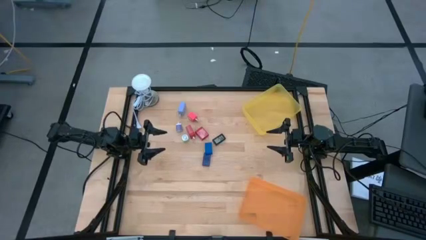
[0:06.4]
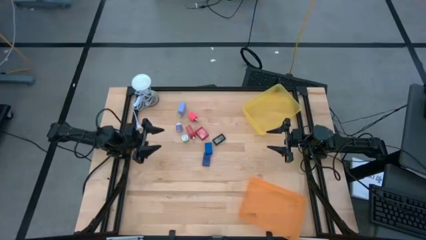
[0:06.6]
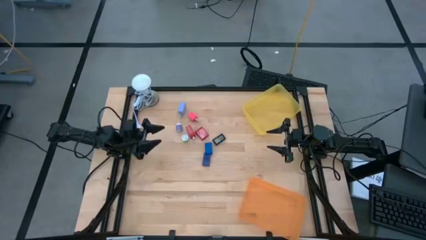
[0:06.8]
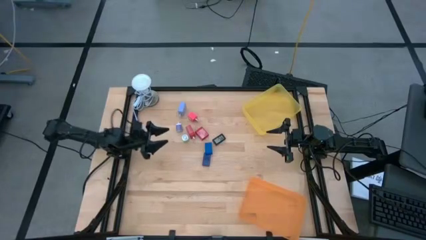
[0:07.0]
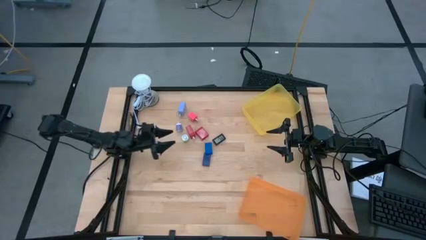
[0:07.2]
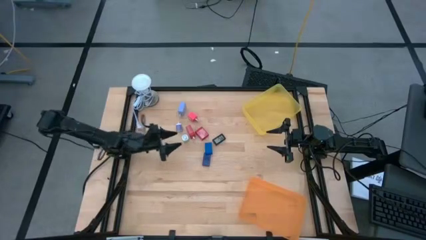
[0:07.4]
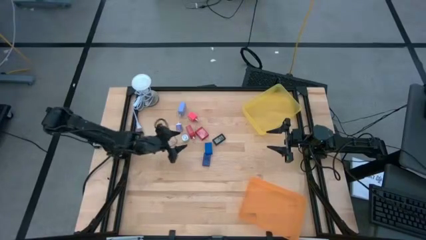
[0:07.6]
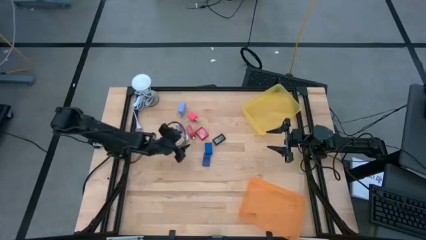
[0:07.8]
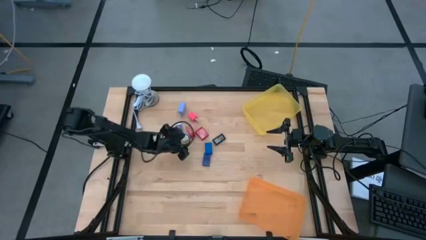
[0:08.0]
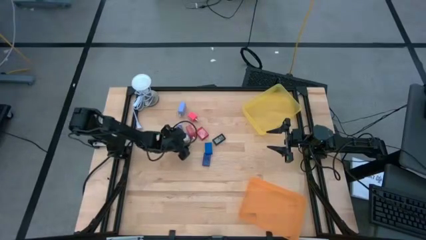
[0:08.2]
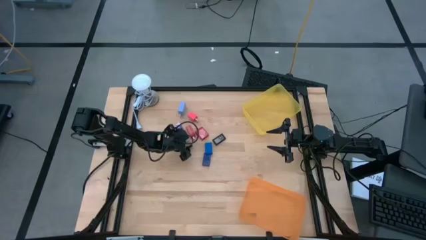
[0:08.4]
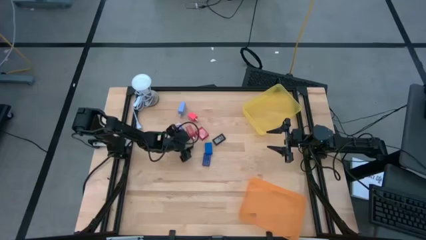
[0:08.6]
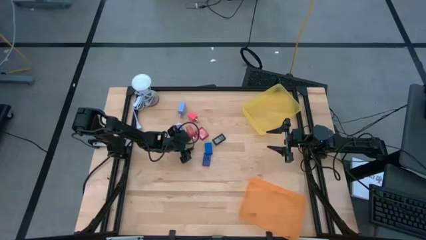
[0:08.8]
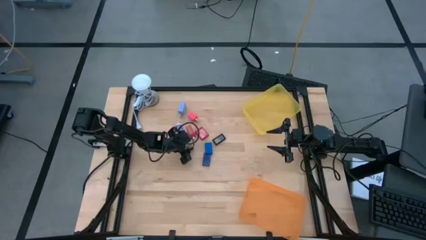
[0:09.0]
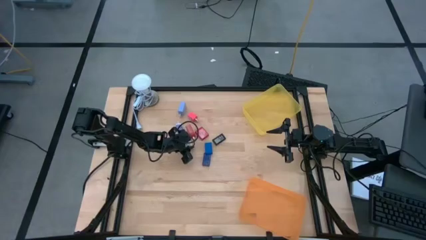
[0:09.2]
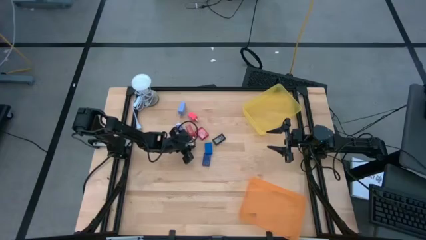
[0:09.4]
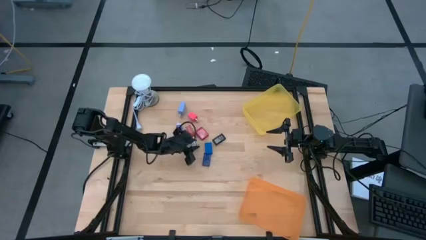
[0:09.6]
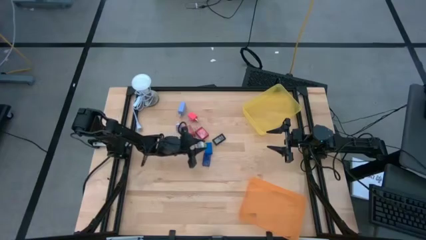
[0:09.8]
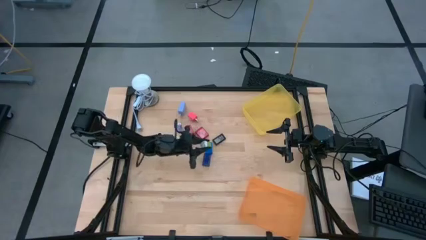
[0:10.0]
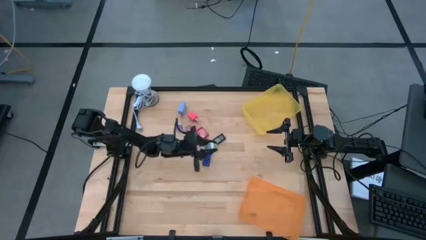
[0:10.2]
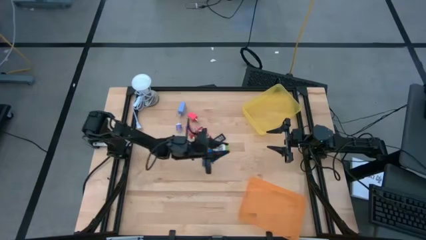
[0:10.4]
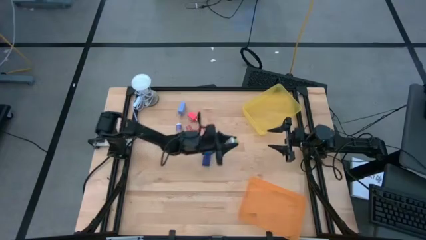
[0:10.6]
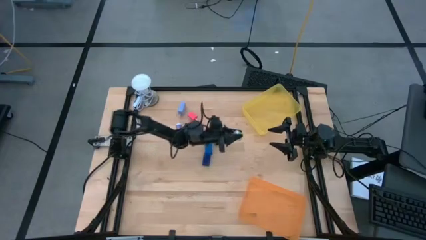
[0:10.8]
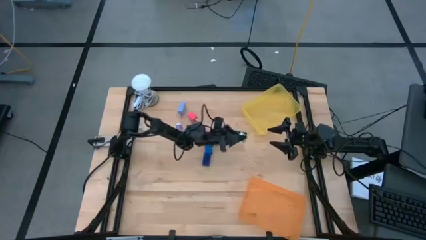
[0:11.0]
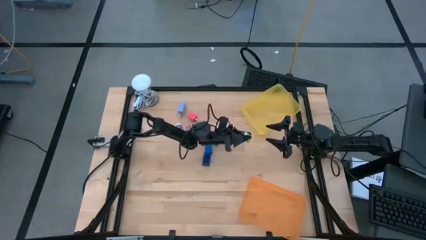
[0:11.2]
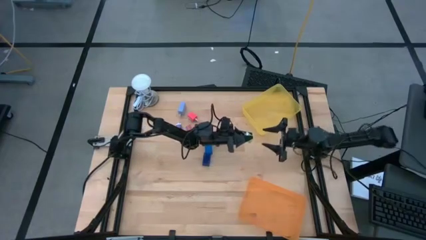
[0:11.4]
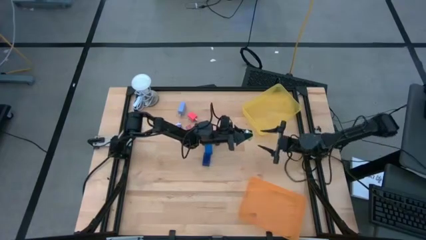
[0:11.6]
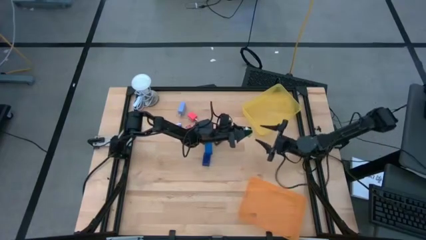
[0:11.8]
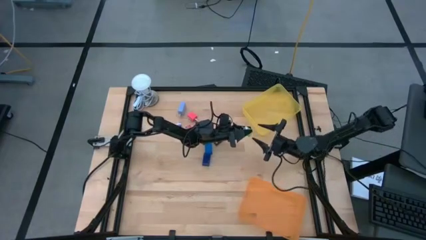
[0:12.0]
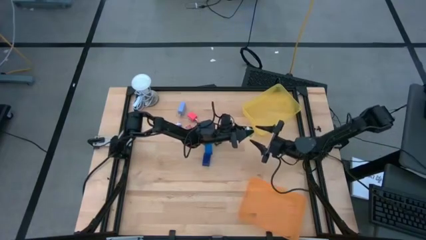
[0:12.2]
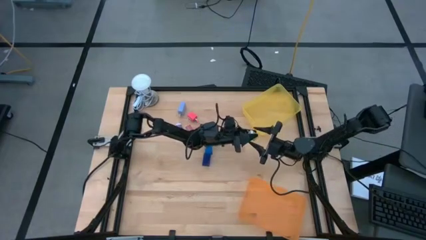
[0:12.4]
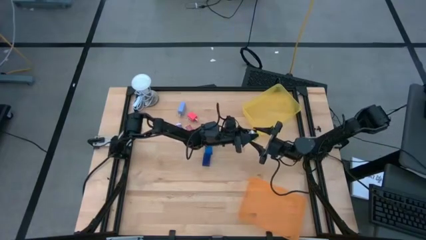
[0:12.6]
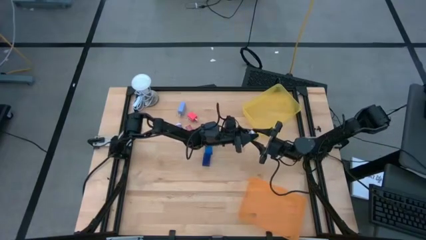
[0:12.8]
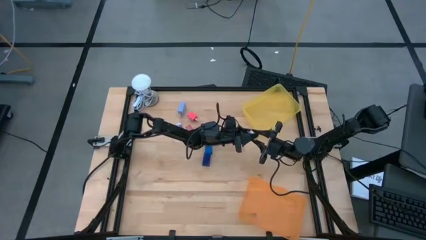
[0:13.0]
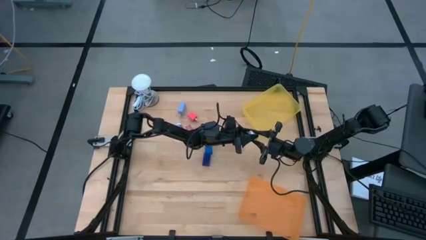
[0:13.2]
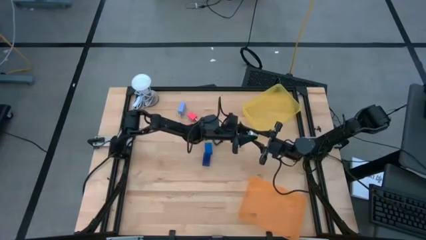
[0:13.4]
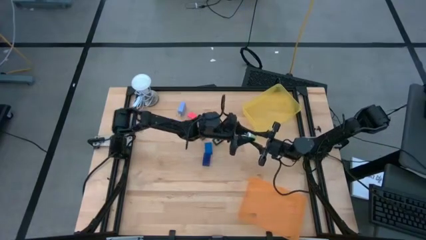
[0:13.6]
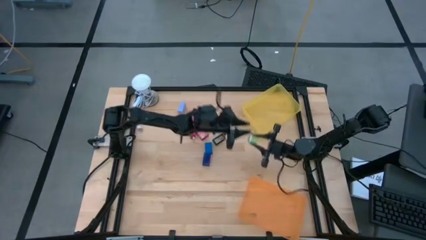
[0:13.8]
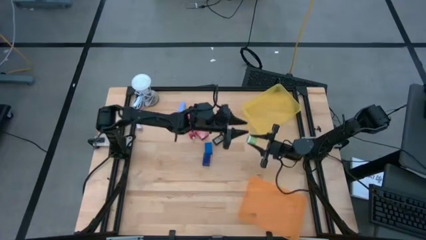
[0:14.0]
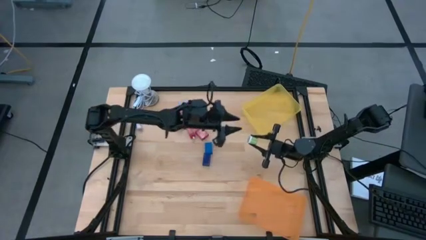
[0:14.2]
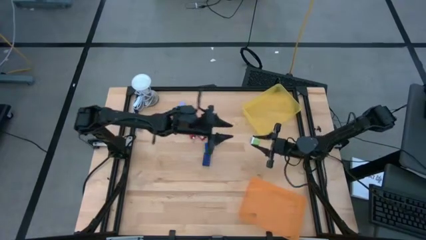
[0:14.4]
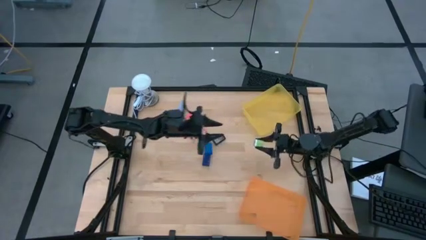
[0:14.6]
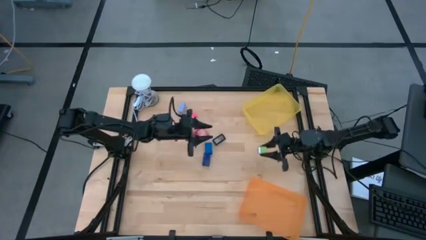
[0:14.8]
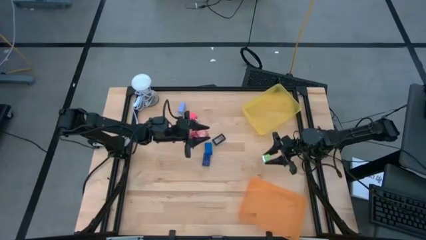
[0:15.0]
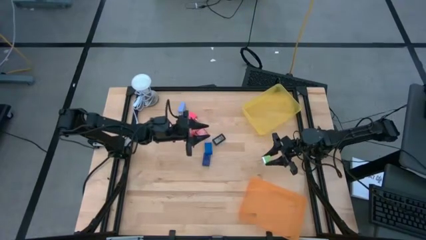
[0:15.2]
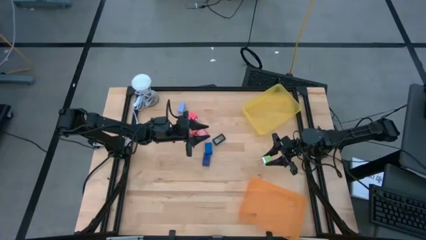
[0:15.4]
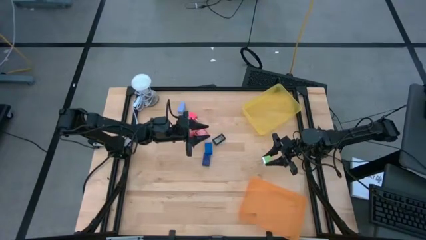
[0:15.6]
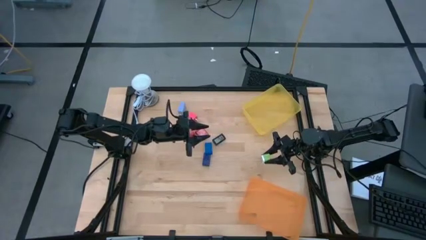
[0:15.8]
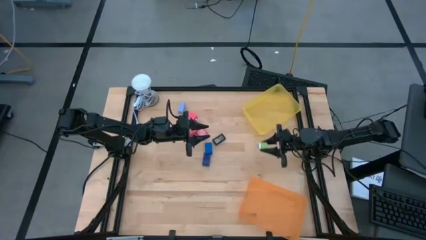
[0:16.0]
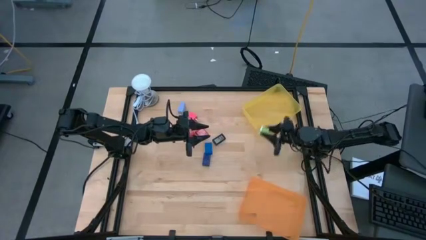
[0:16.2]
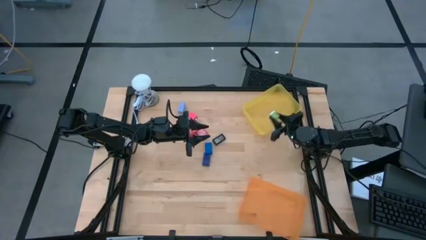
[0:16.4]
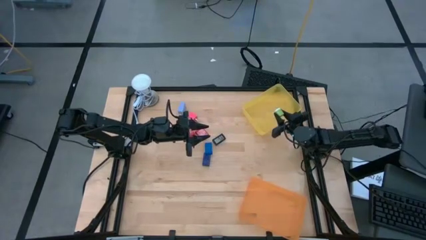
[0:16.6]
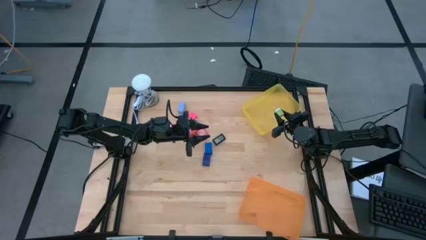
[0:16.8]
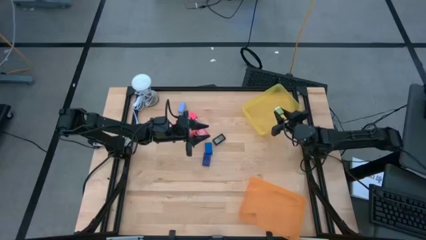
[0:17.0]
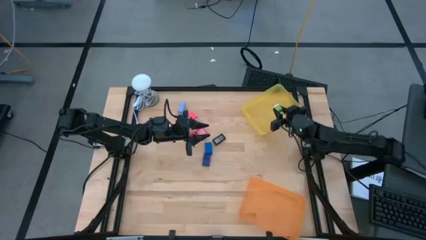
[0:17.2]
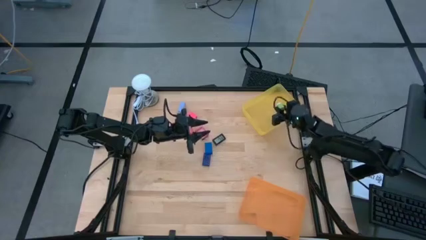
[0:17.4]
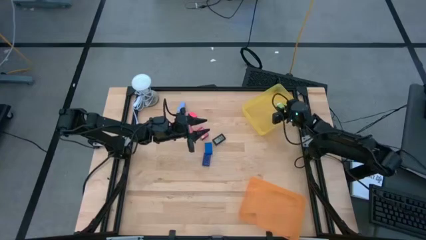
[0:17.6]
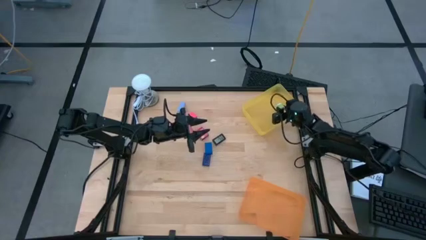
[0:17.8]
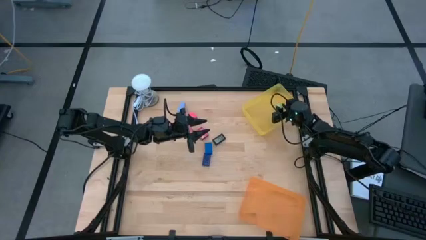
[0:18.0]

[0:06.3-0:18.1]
Task: Pick & Place Office items
Put the green charger adapter into the yellow bin
